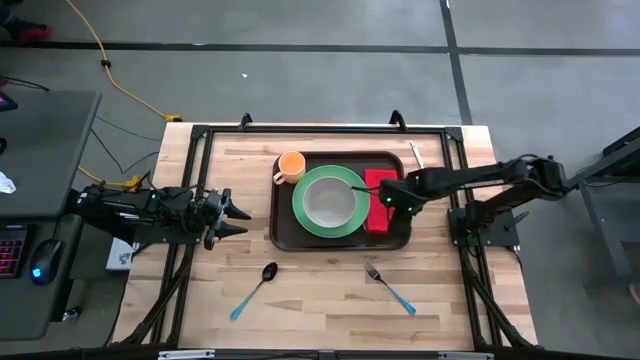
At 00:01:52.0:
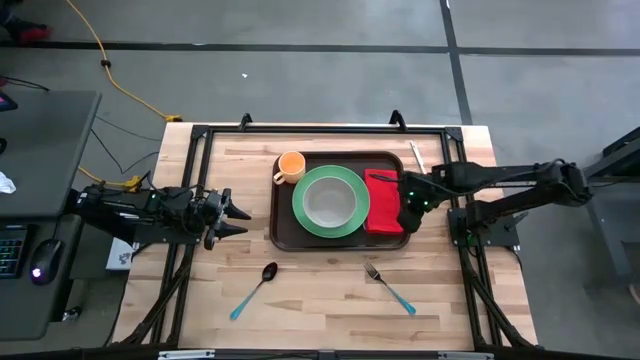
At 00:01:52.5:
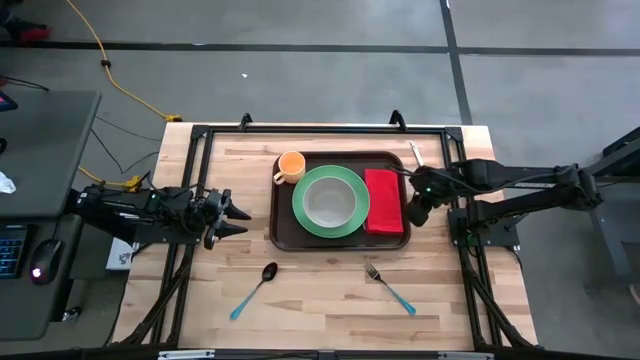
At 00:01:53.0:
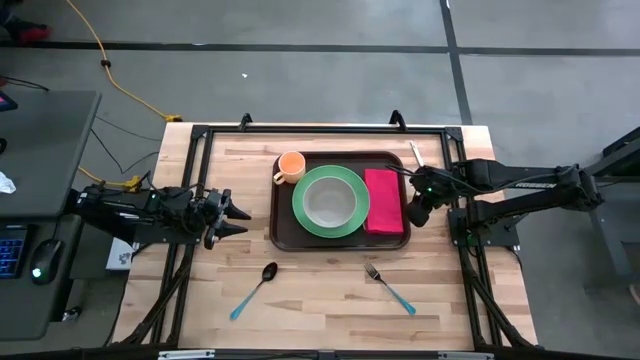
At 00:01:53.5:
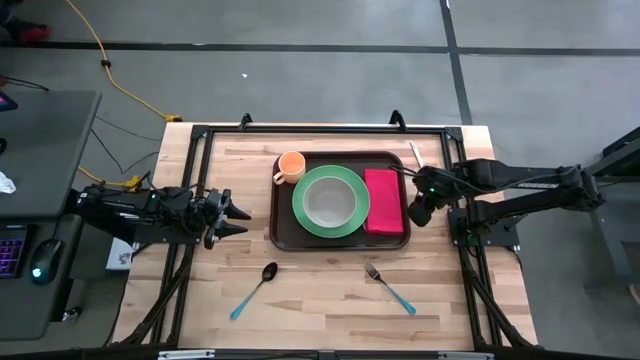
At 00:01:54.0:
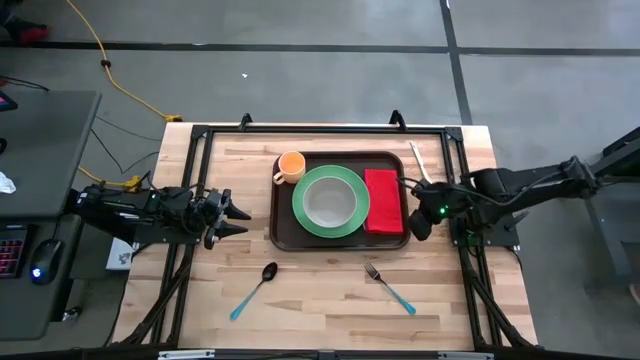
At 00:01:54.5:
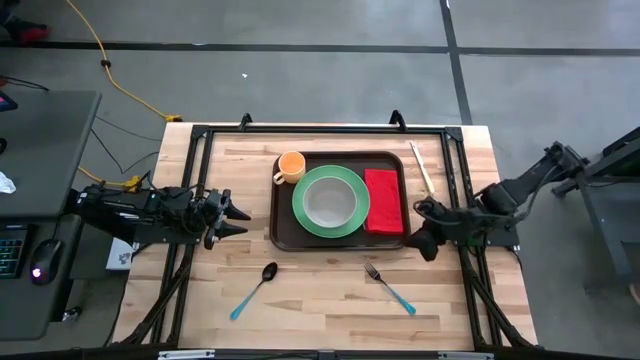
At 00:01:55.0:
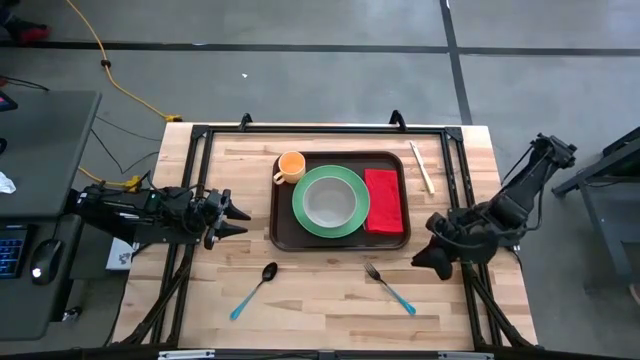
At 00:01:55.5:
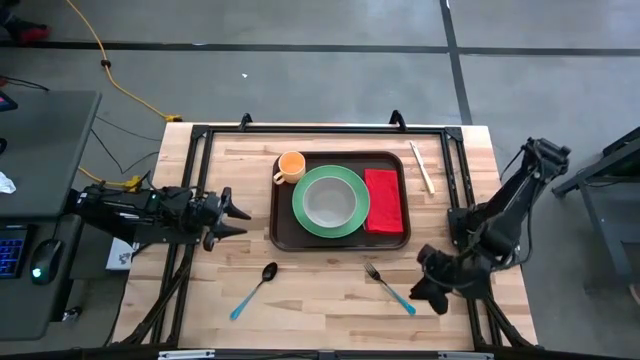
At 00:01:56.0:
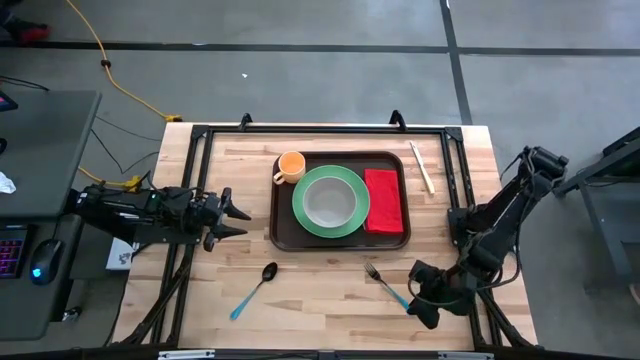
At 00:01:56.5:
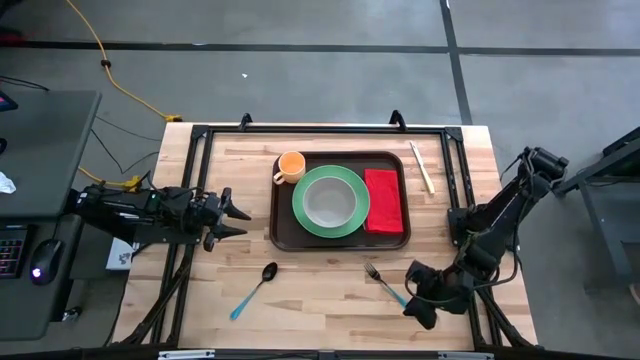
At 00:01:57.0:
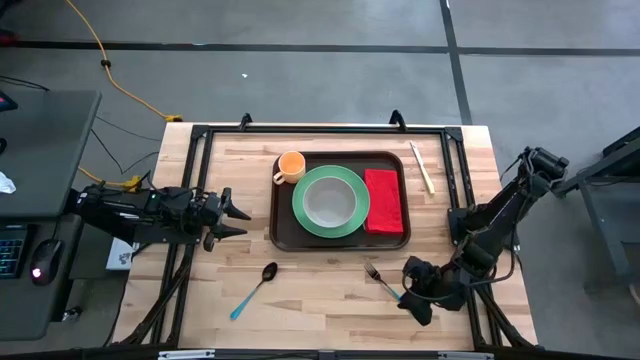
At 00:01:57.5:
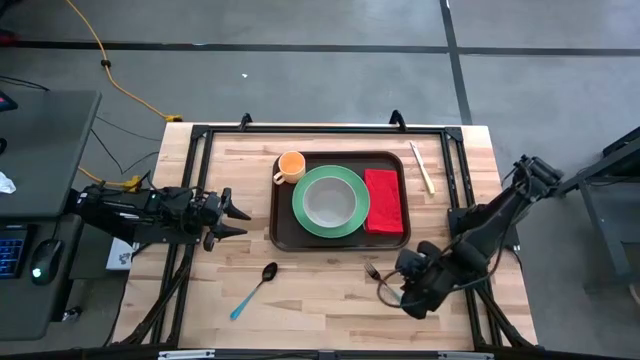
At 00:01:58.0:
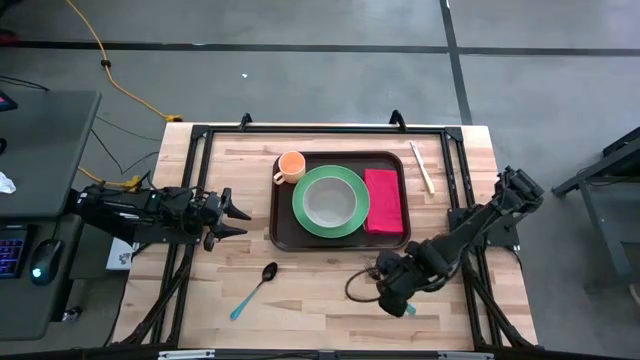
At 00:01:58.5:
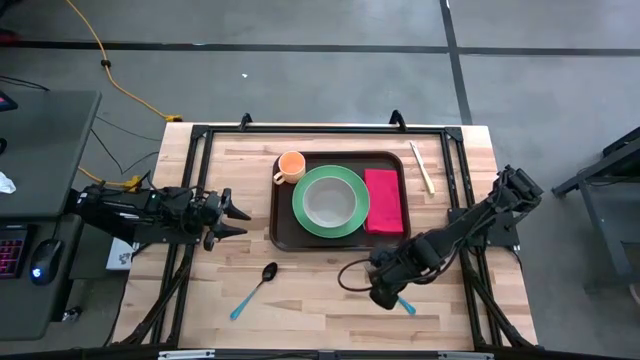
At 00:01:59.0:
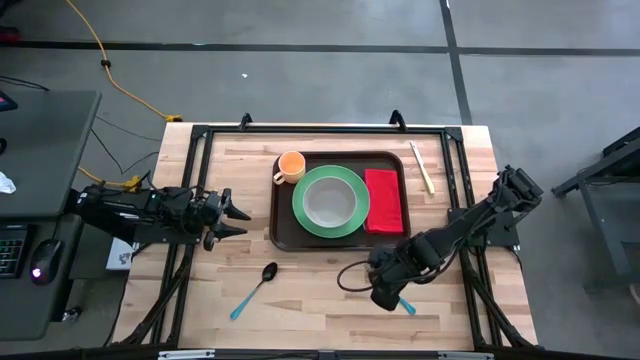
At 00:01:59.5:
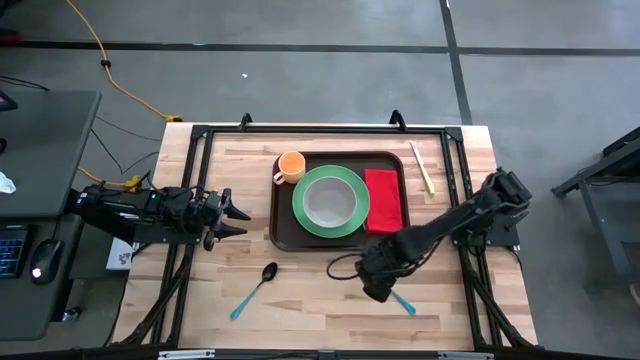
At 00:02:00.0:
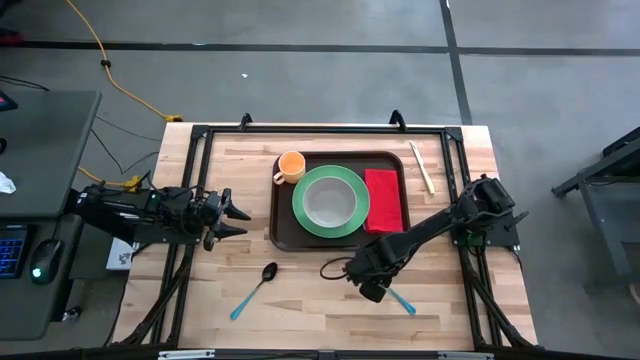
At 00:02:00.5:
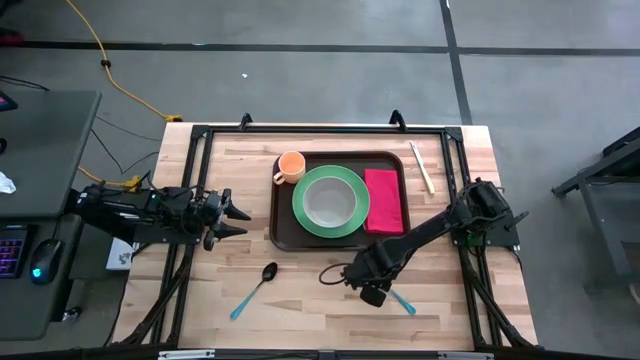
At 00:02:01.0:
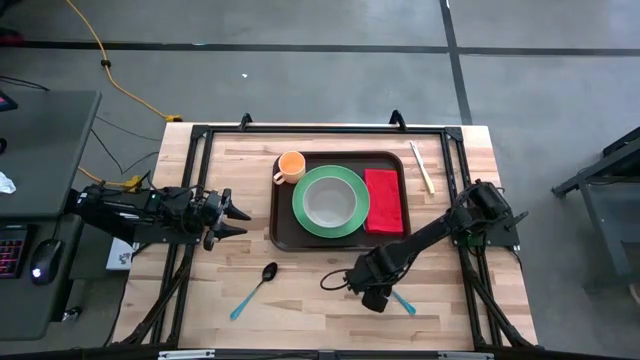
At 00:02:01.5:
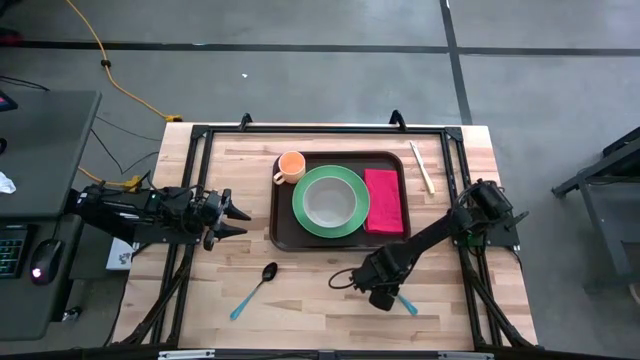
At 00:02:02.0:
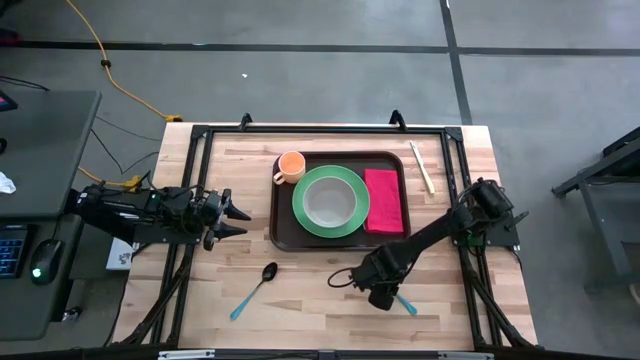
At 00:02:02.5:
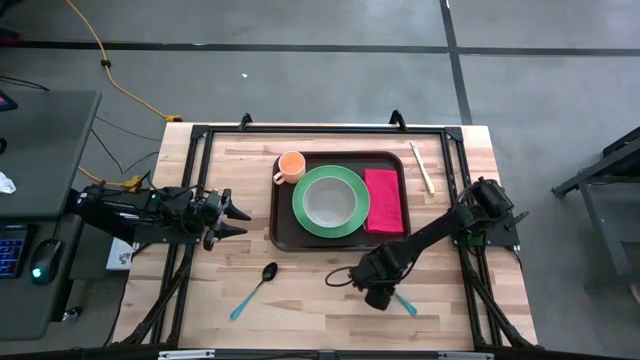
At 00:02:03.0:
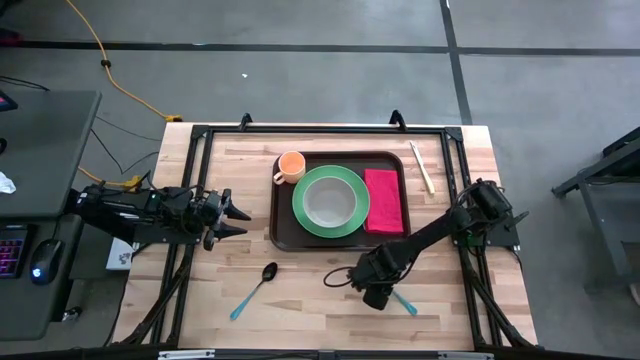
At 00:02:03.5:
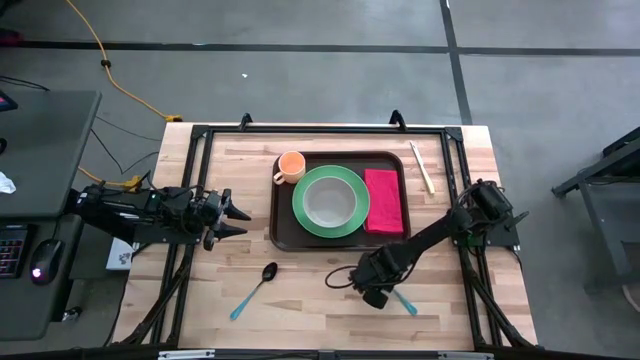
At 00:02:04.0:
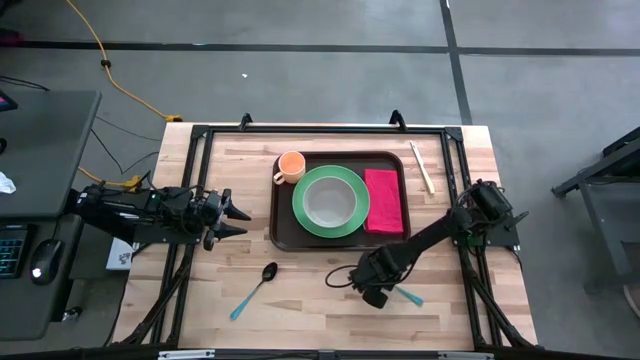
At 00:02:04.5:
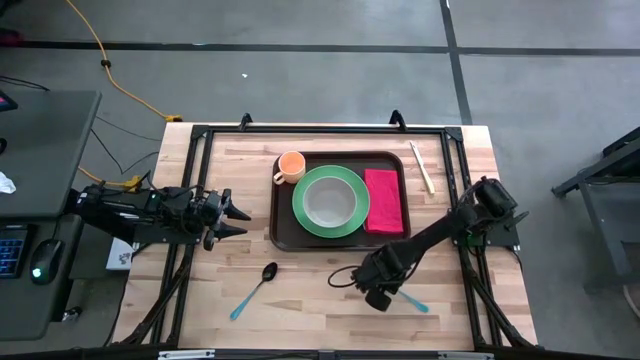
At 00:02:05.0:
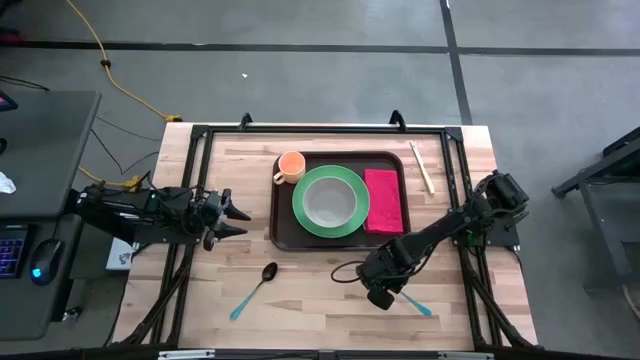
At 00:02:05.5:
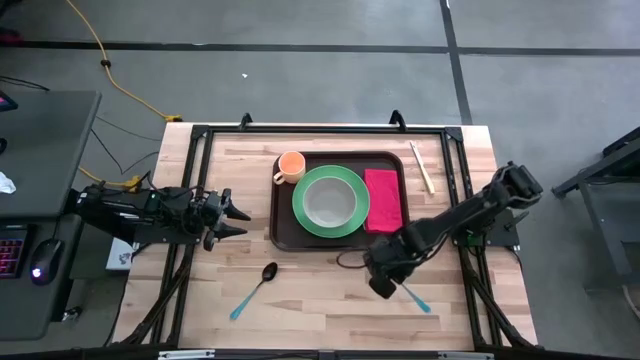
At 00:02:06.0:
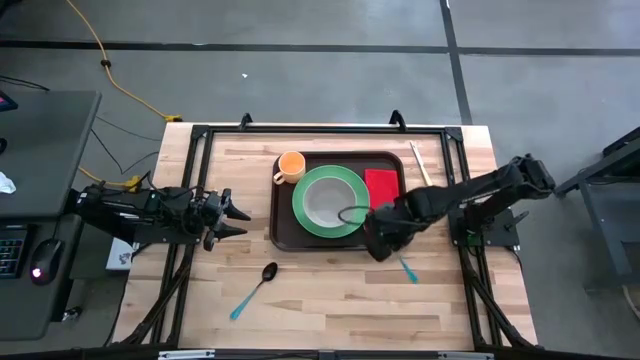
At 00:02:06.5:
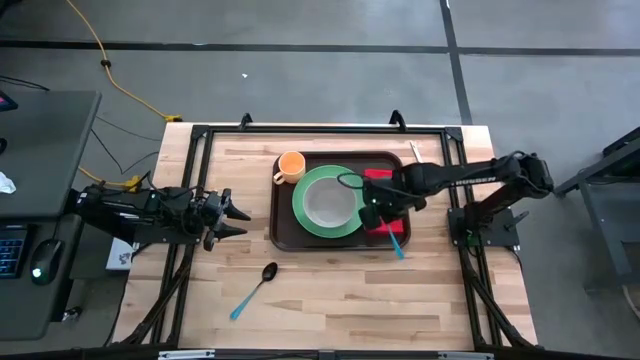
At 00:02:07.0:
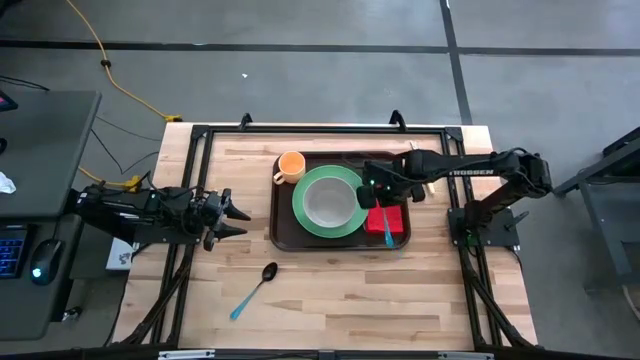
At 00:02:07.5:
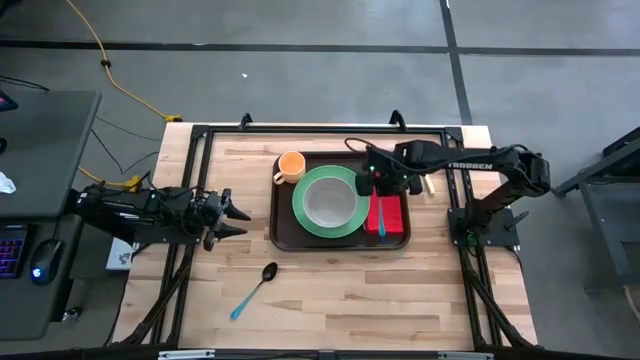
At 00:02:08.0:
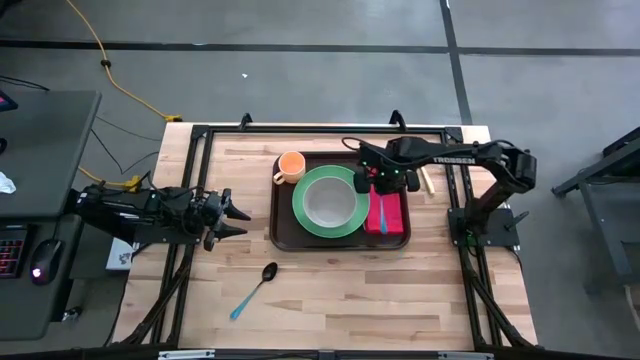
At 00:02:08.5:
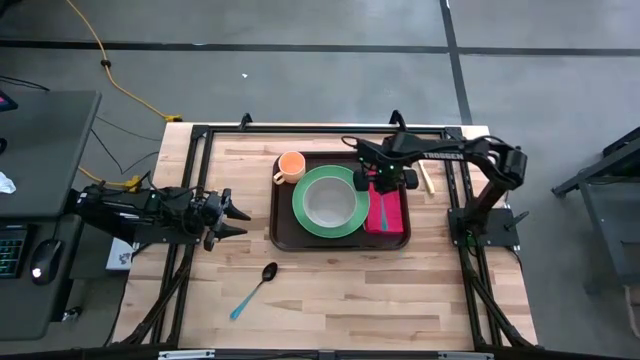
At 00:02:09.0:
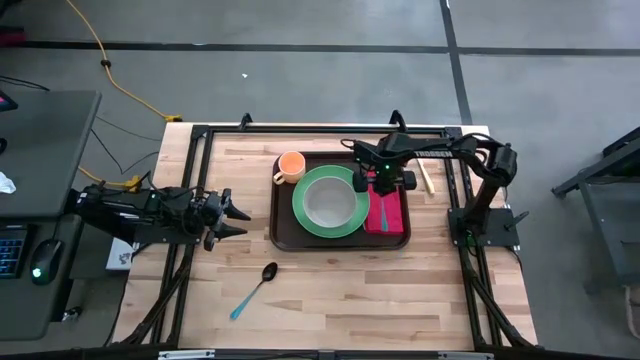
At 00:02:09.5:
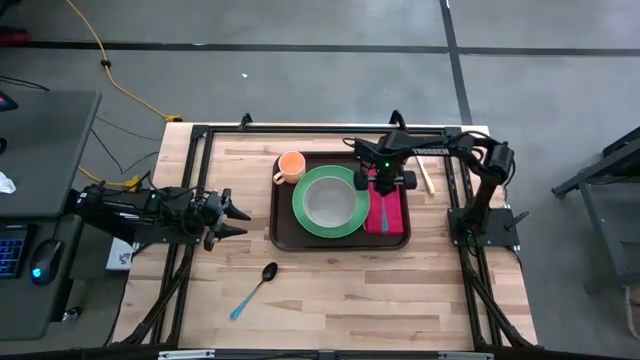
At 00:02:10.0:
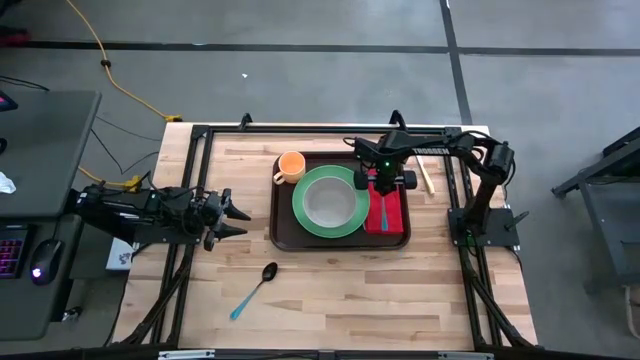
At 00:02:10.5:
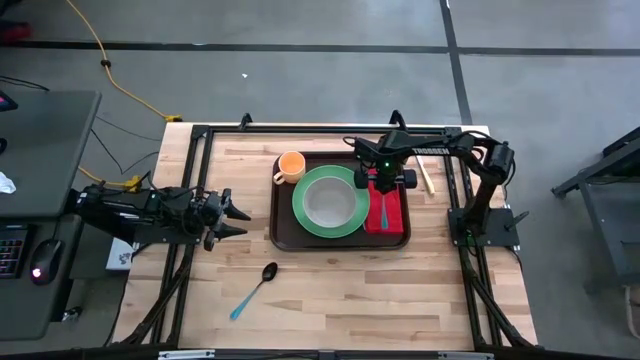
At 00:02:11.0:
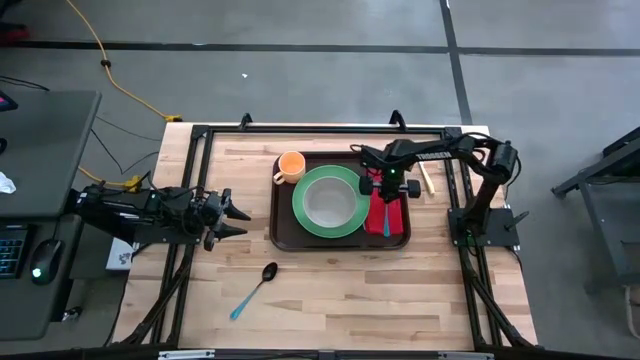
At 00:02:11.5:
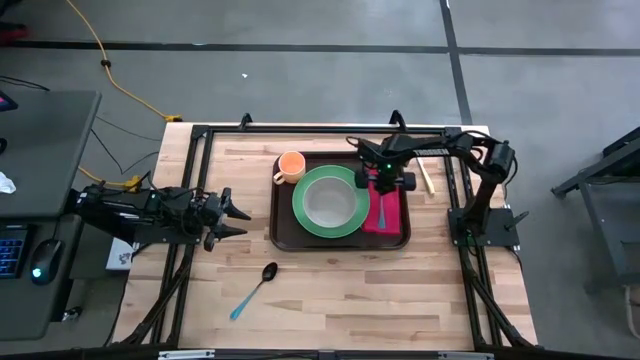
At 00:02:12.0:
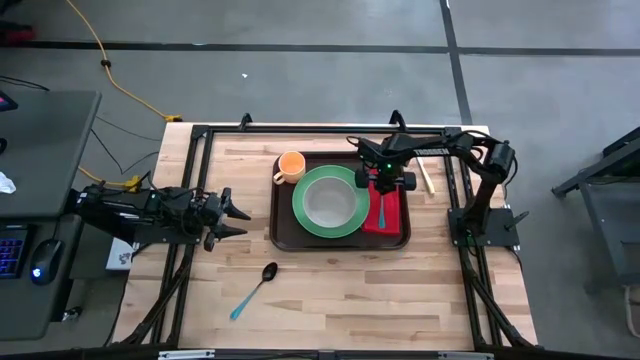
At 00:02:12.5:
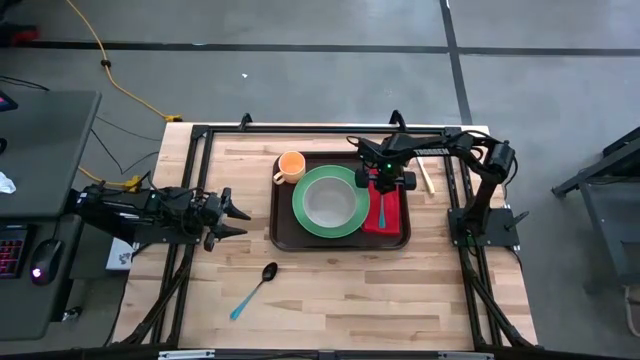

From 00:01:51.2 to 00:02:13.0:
Task: Set up tray
Put the blue fork on the red napkin
